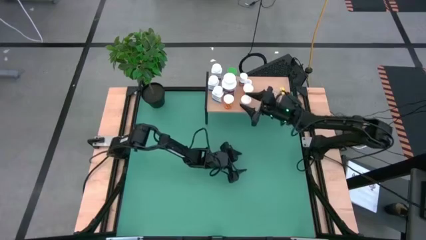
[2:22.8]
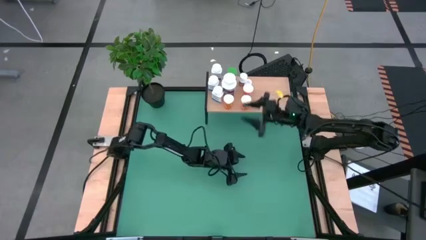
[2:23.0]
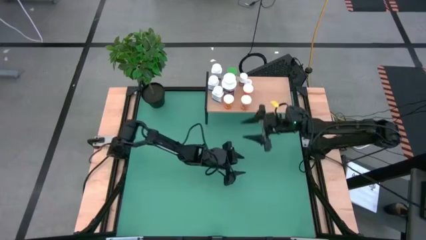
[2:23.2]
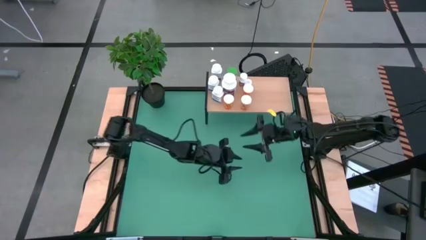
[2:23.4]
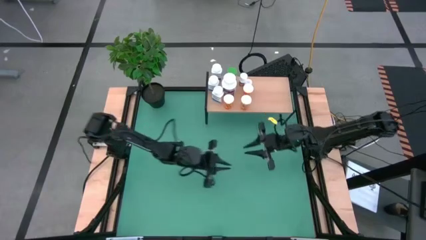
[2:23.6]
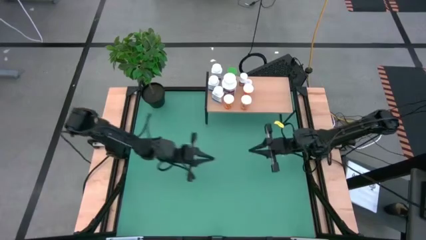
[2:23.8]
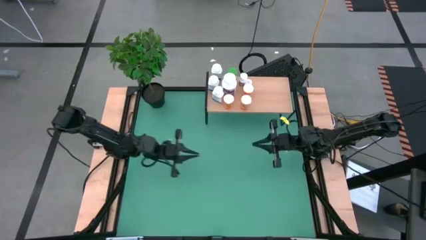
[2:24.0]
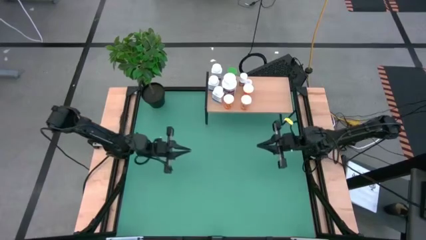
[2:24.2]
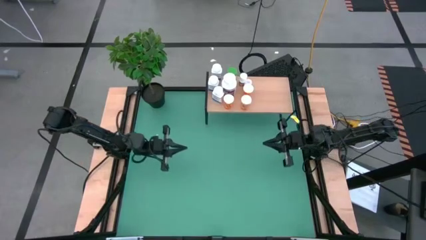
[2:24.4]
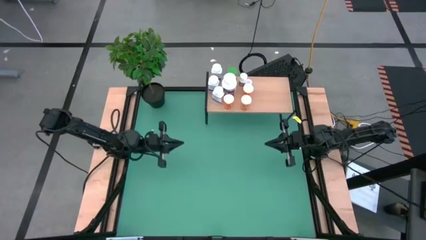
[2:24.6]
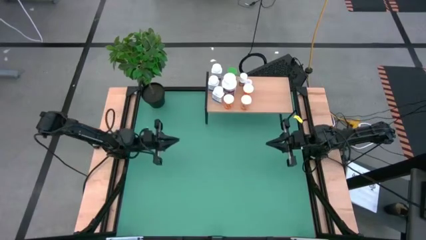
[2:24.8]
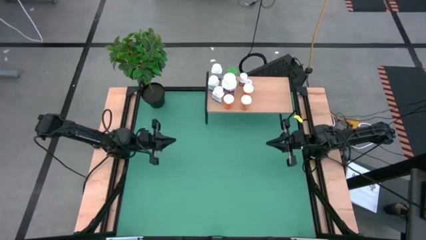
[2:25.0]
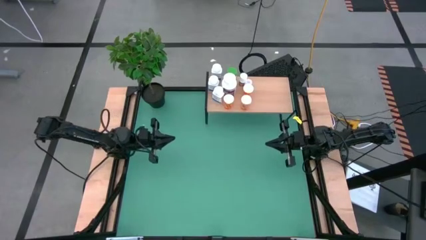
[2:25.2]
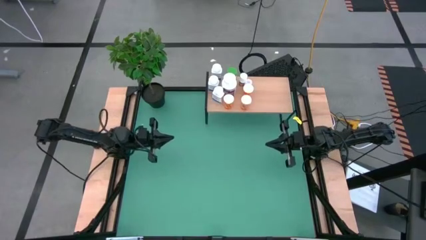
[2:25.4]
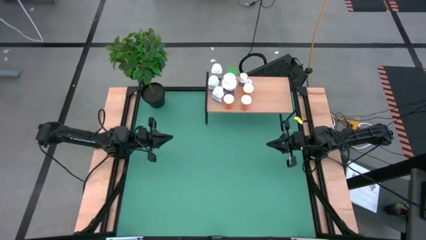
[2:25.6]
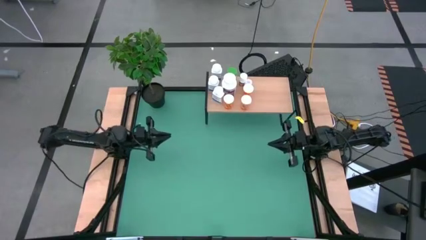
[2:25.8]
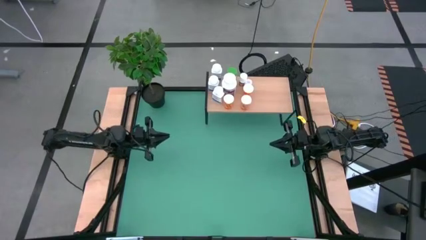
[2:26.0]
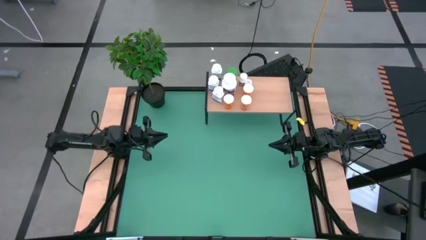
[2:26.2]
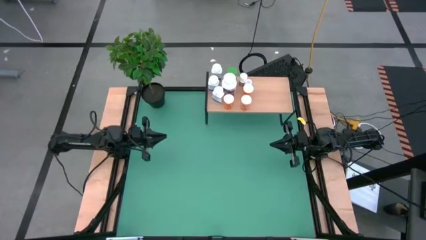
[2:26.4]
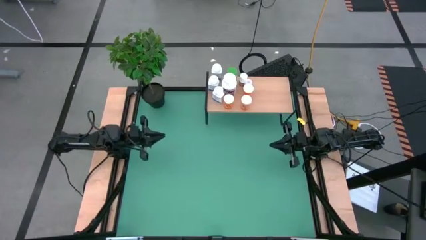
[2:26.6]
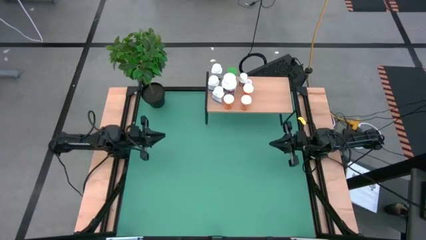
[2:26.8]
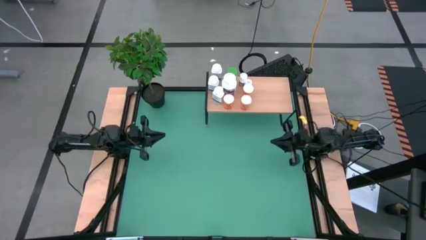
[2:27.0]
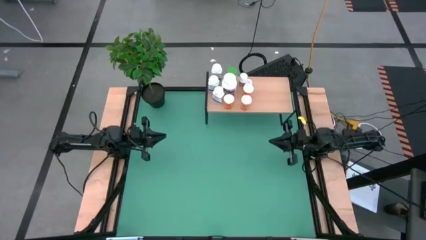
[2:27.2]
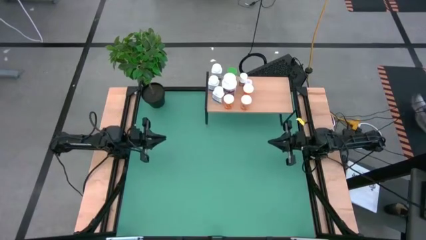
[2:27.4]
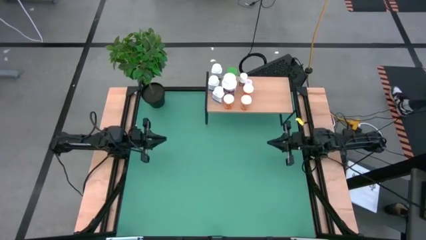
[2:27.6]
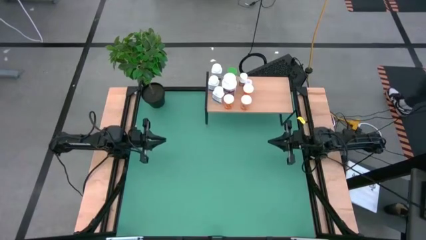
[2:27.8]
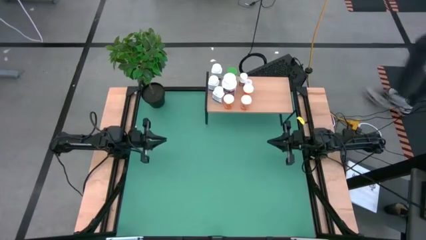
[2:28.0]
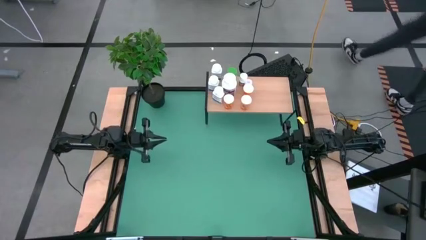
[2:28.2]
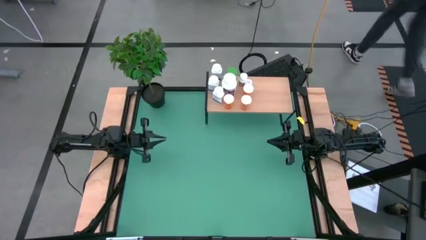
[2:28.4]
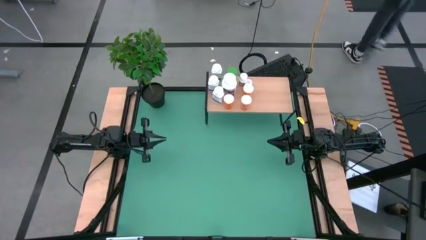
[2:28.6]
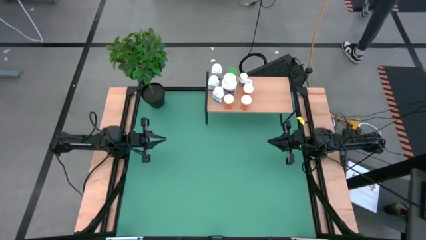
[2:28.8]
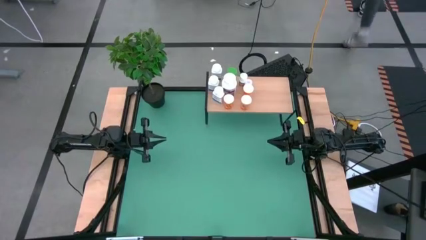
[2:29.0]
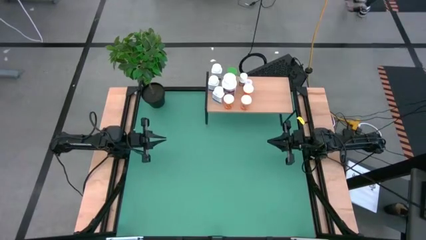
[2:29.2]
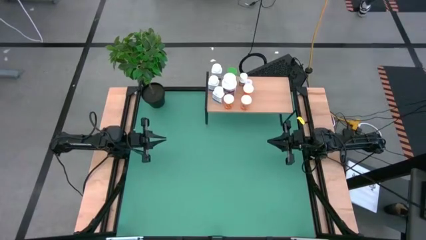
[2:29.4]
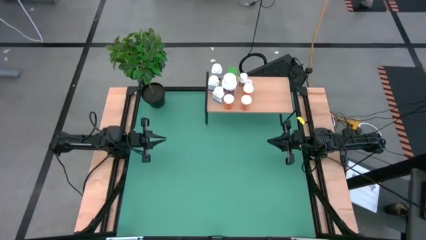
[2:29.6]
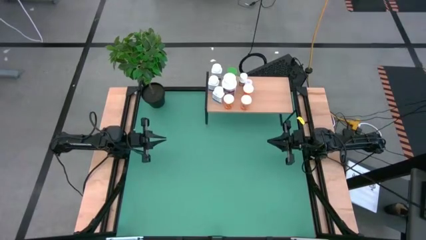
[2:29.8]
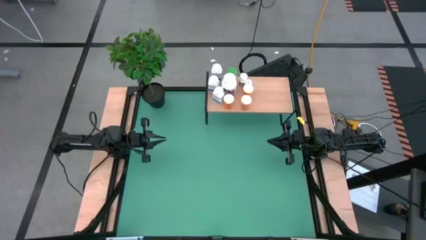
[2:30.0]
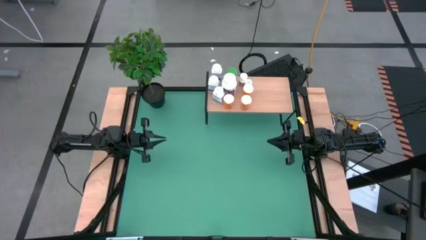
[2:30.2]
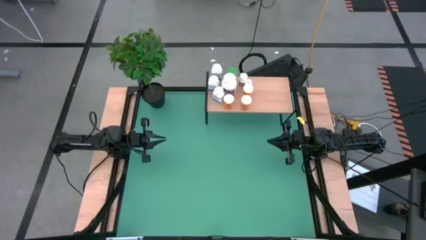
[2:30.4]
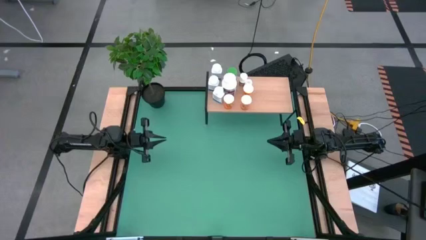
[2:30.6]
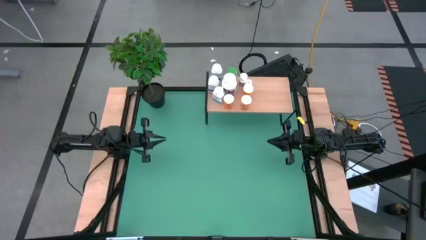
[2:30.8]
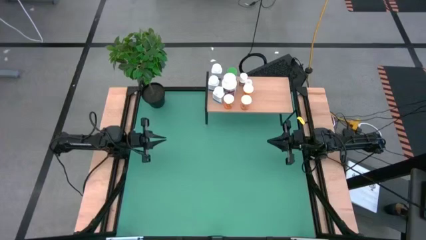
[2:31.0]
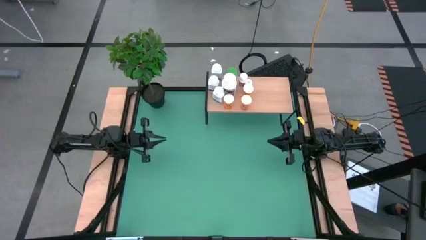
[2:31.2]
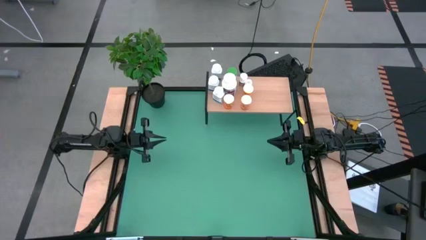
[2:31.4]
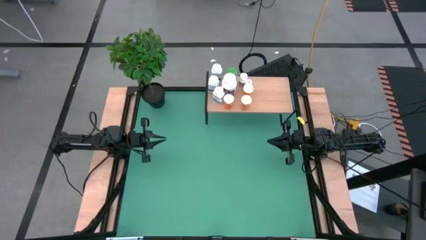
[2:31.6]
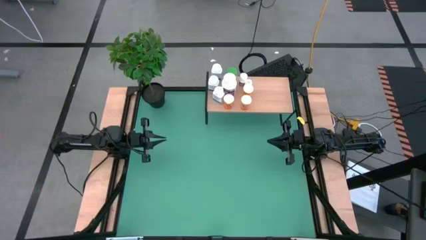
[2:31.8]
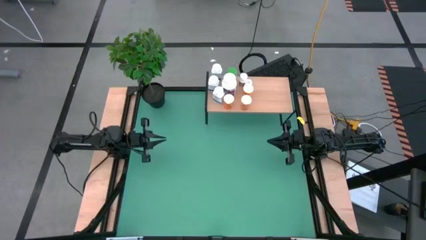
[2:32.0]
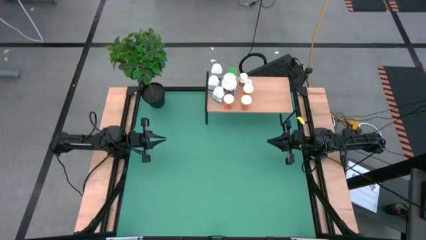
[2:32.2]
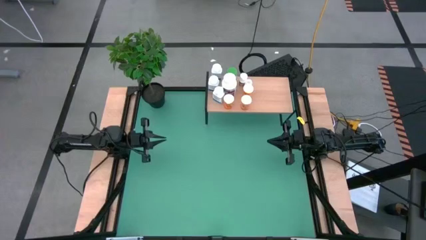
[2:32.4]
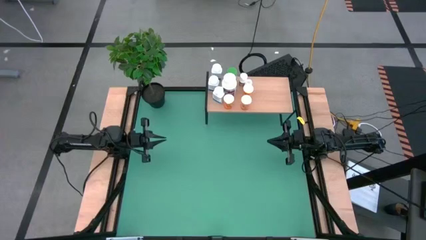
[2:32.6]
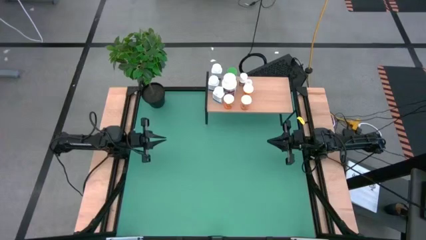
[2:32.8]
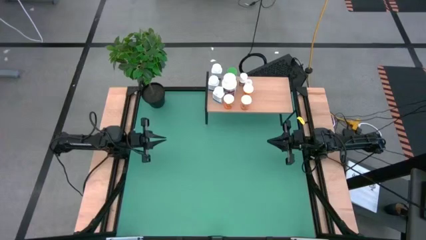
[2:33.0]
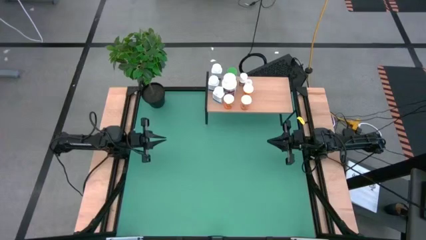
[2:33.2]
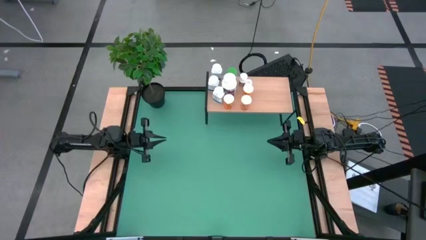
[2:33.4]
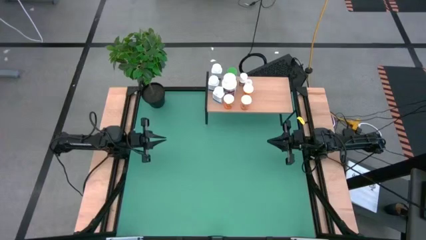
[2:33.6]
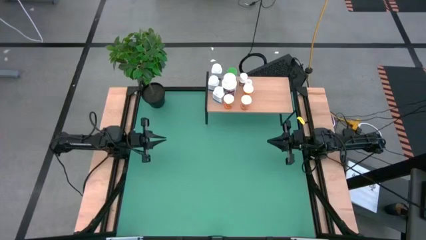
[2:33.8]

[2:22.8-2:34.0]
Task: Pick and place medicine bottles onto shelf by color
Return to Home Position
